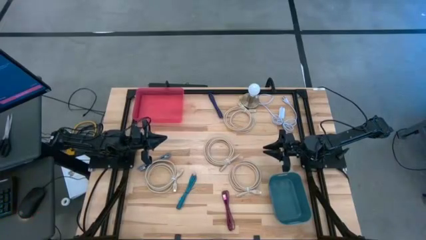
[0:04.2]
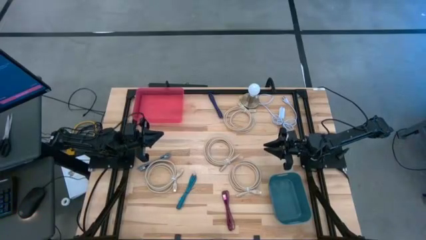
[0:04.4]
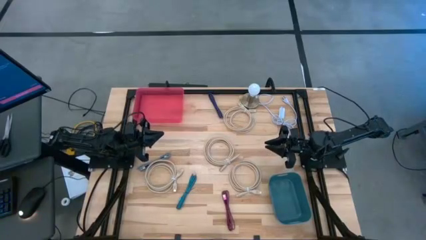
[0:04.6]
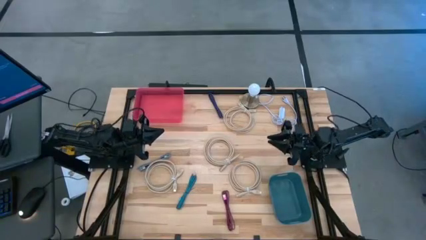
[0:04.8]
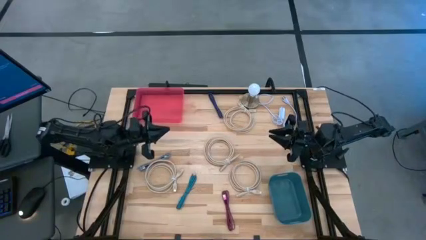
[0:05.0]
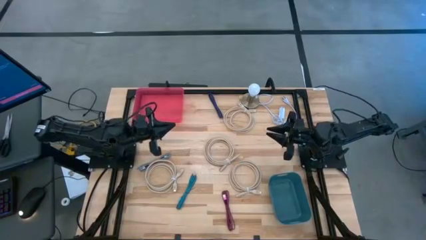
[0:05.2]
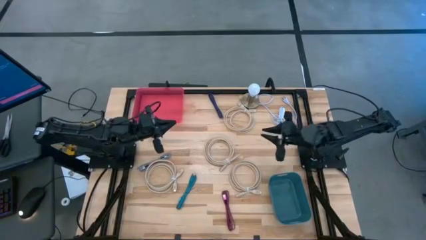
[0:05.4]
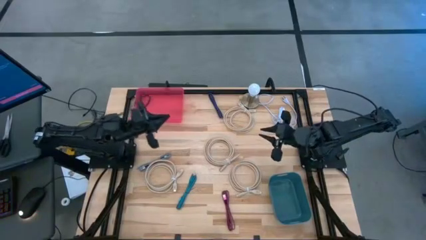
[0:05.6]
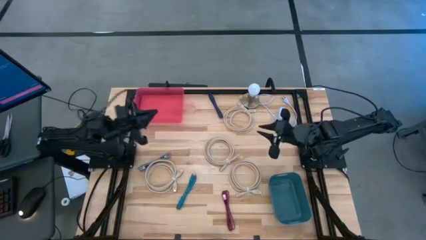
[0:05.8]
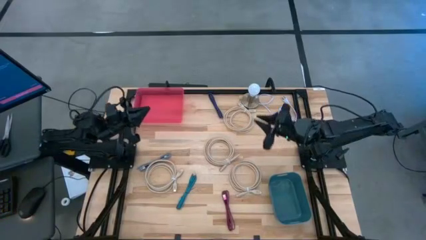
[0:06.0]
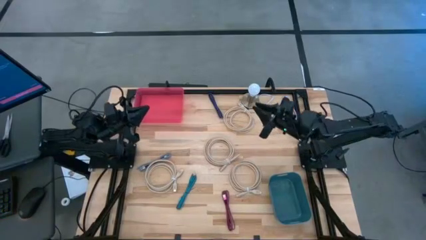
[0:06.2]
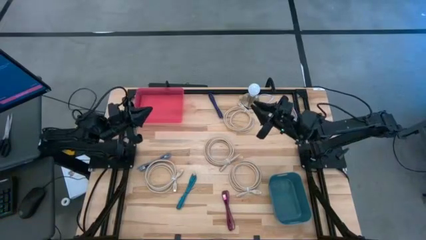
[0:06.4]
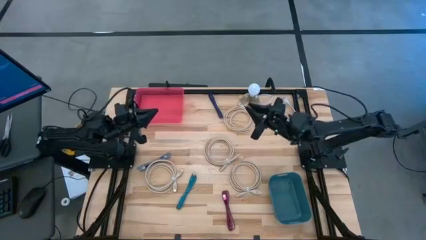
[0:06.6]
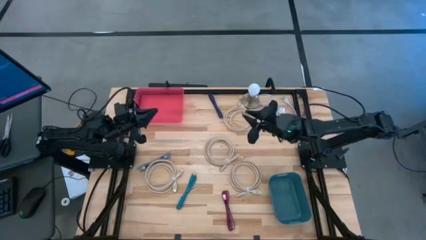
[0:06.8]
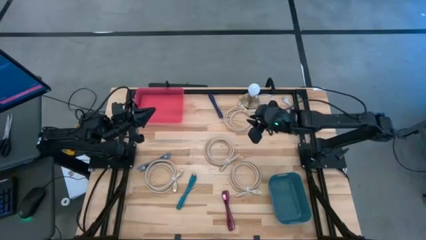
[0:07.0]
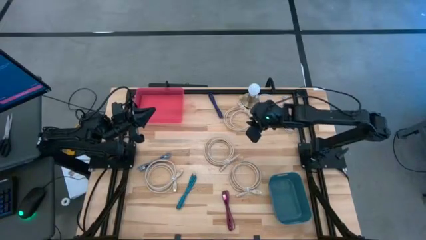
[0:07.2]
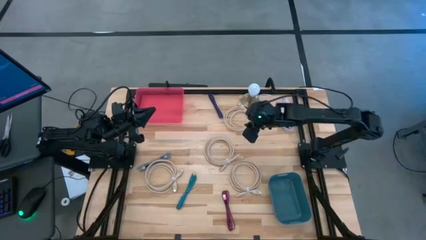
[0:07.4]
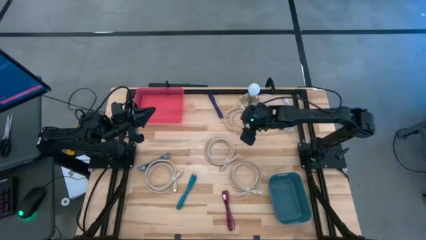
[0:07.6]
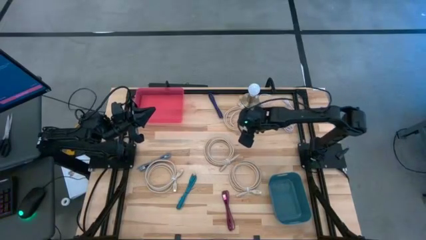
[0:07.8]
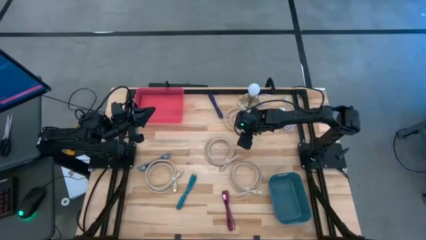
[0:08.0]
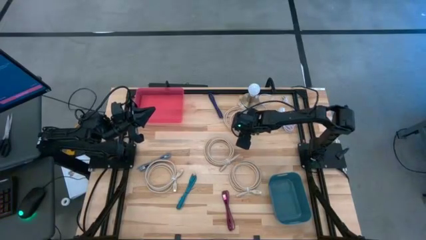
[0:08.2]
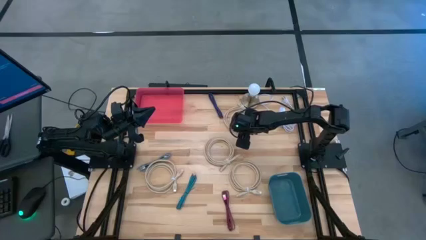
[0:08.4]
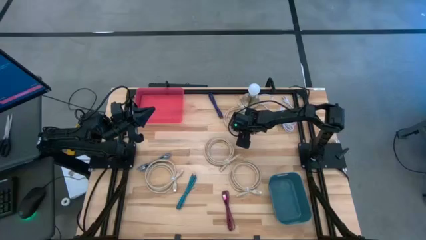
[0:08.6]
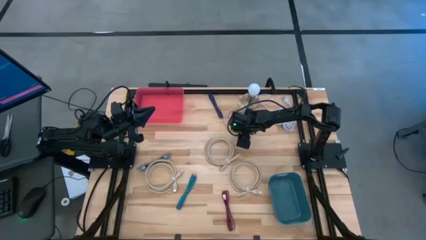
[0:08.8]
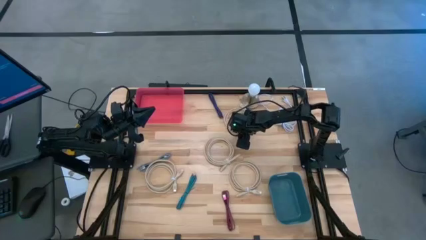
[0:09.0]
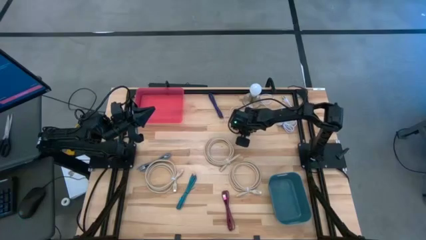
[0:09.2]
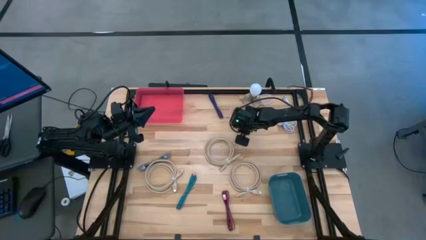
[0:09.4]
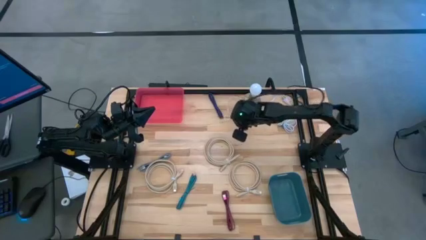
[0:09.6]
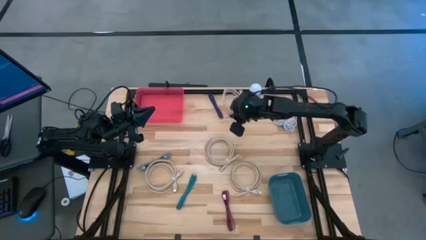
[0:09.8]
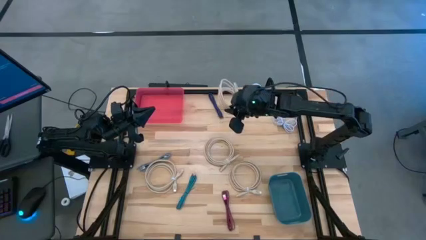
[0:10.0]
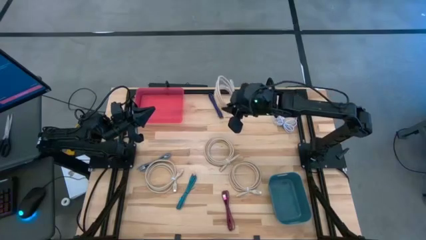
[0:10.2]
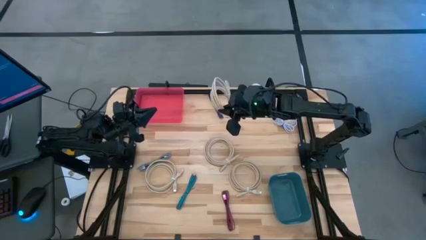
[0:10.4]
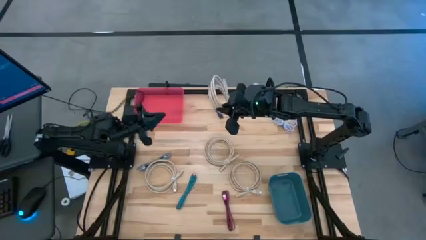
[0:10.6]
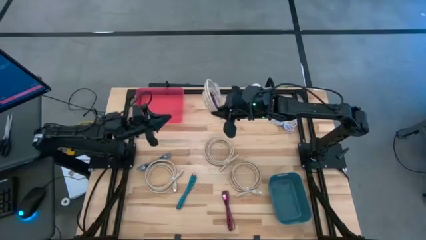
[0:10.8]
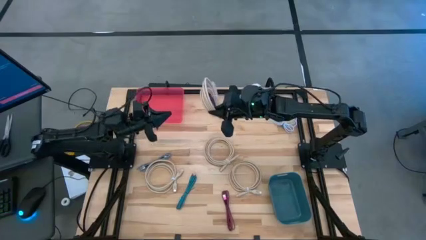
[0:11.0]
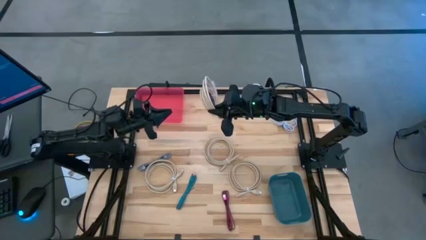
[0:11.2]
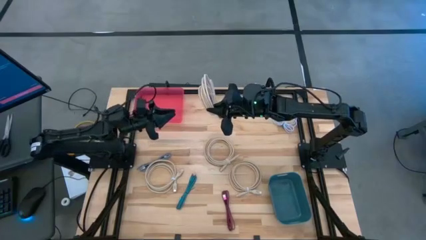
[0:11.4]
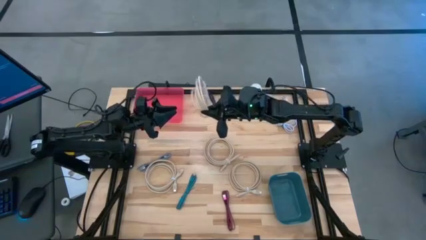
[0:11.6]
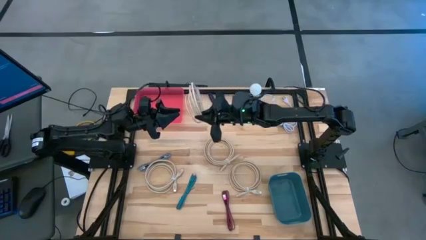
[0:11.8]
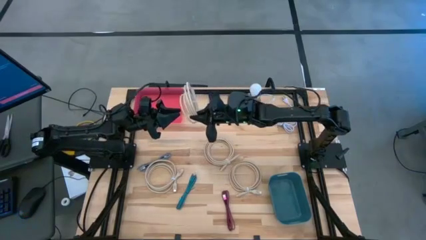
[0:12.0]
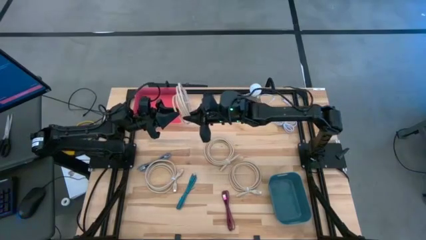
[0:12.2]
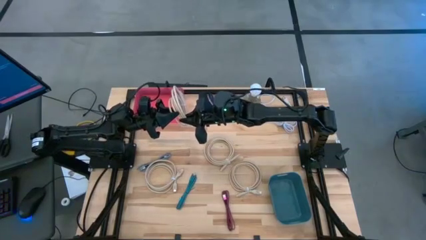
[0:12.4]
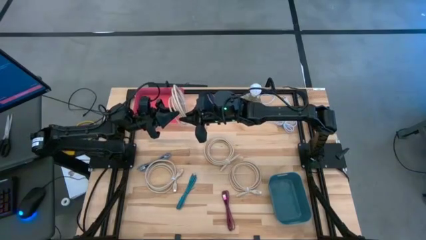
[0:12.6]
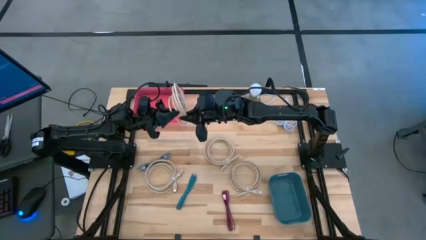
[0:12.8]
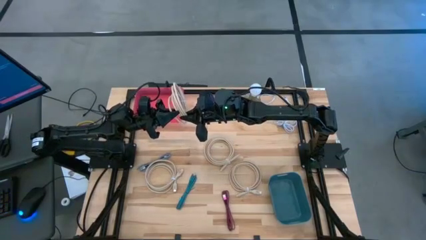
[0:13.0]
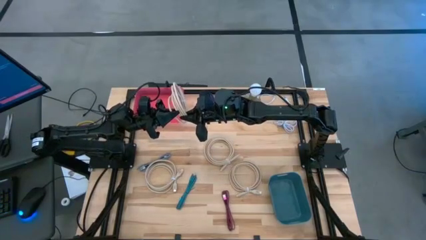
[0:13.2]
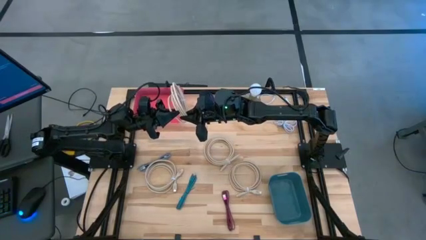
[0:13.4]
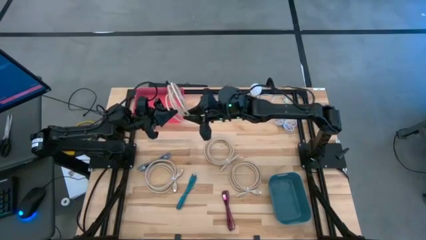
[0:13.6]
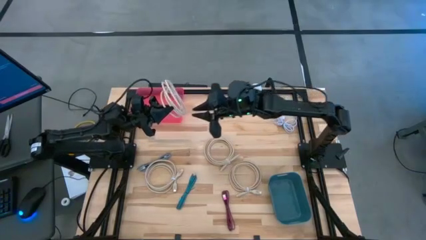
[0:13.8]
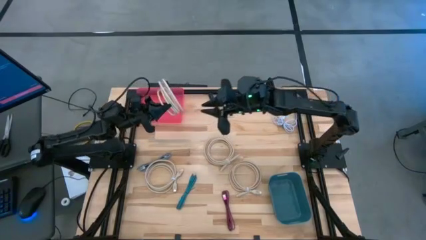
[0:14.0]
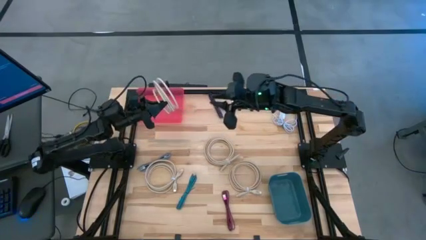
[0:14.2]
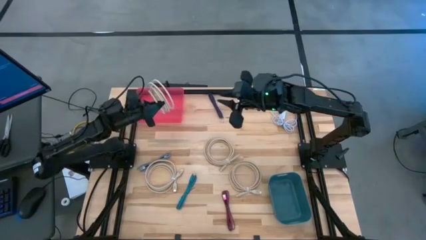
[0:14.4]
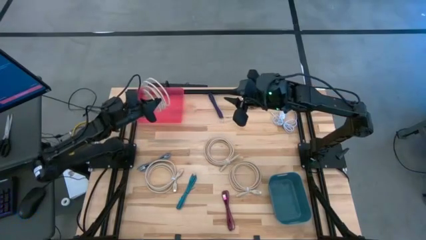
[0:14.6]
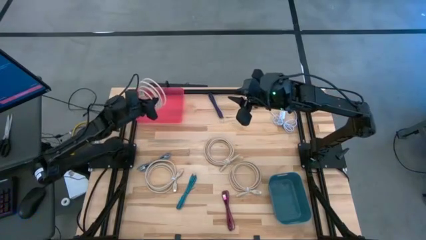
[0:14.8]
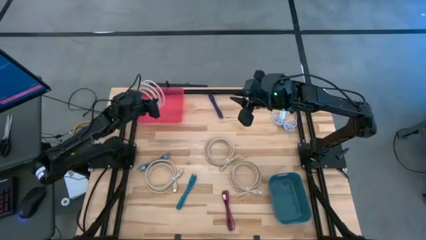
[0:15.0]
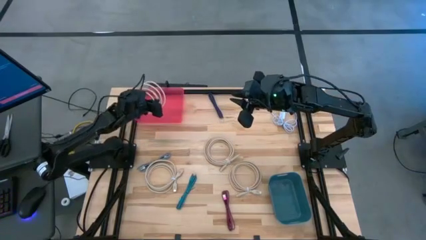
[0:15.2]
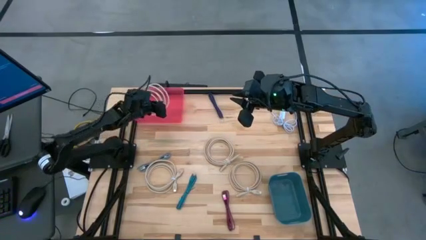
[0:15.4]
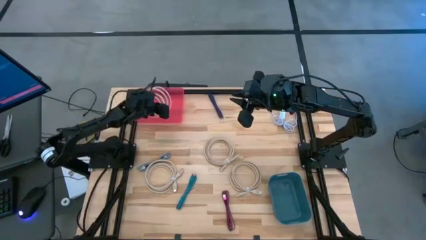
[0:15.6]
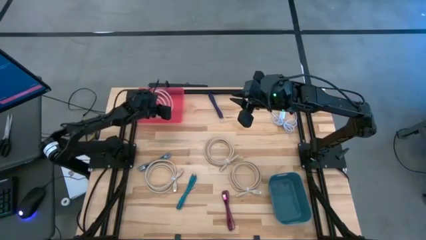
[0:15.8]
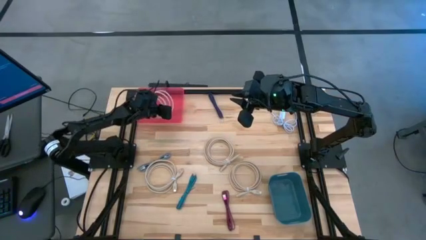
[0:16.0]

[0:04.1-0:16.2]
Task: Pick & Place USB Port
Put the brown USB cable into the red bin

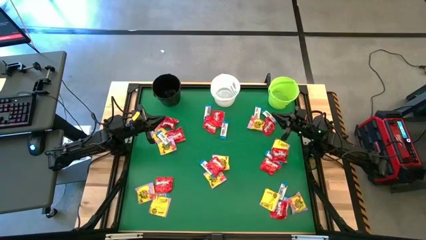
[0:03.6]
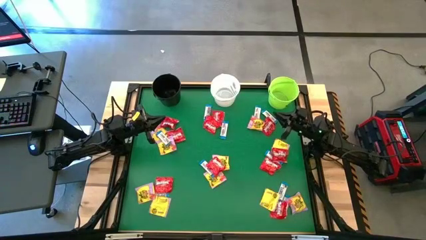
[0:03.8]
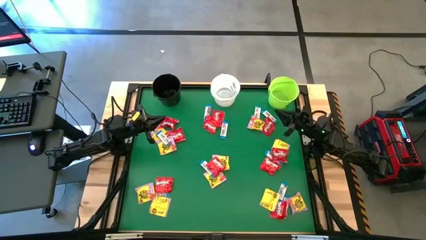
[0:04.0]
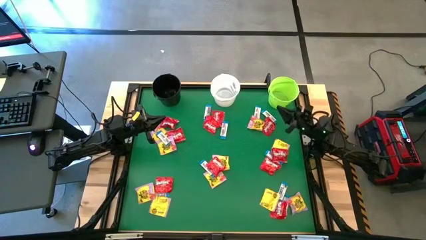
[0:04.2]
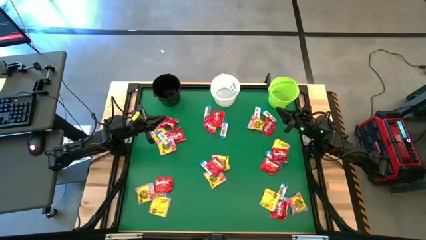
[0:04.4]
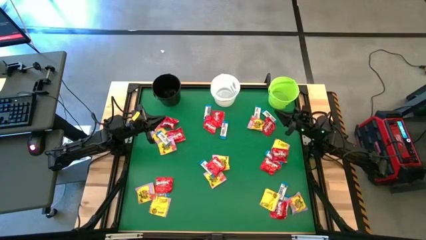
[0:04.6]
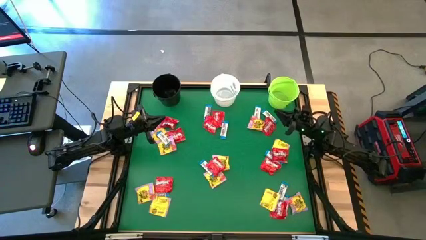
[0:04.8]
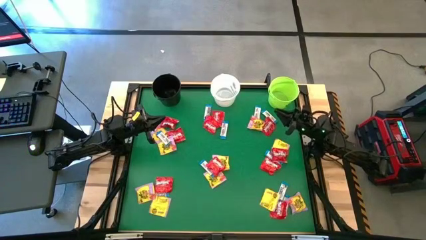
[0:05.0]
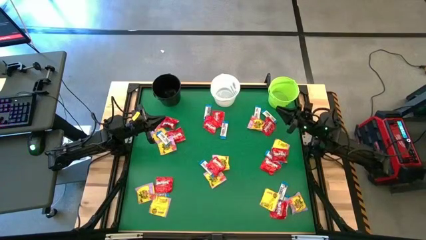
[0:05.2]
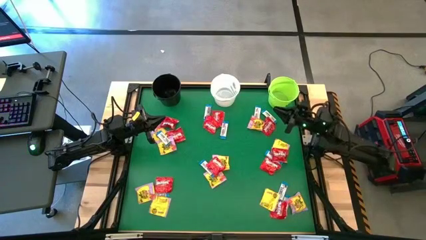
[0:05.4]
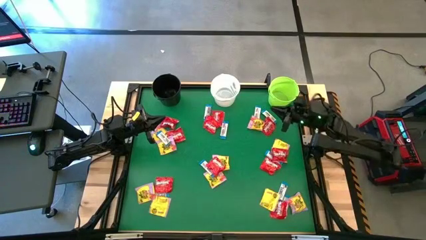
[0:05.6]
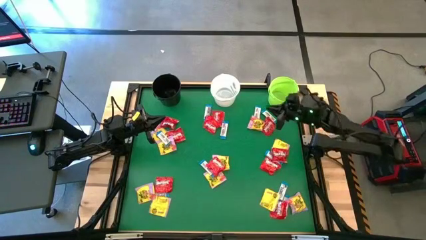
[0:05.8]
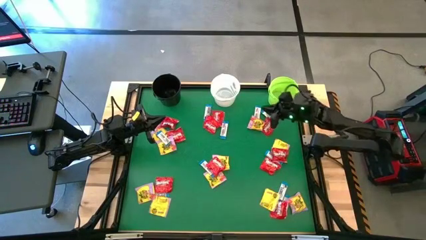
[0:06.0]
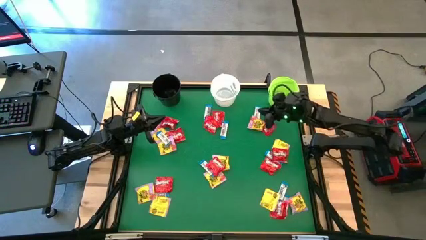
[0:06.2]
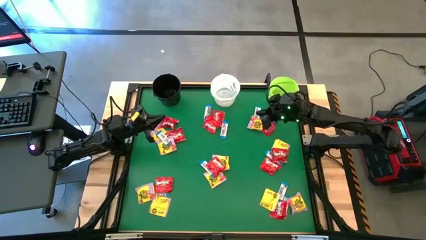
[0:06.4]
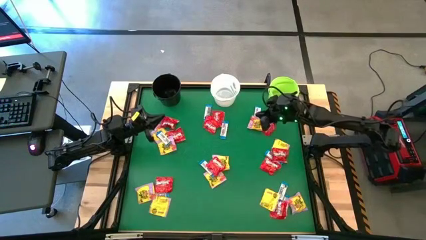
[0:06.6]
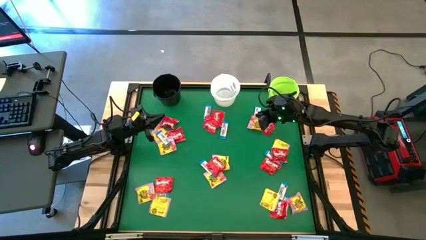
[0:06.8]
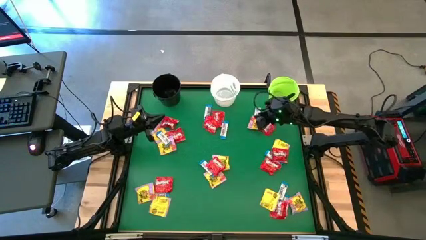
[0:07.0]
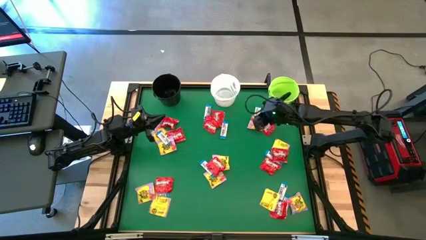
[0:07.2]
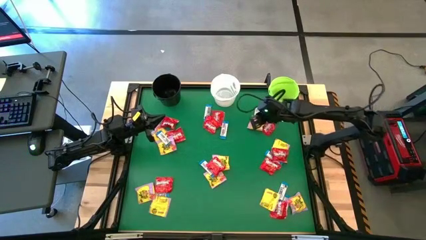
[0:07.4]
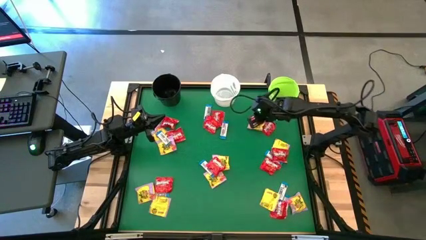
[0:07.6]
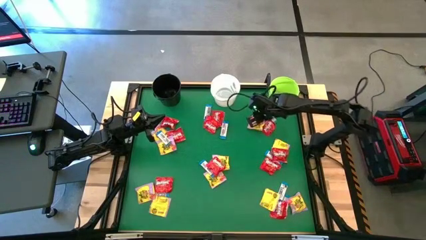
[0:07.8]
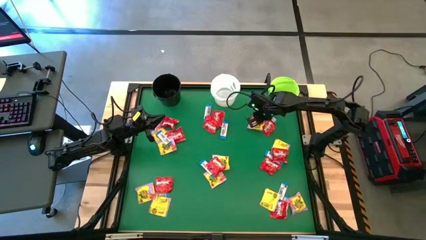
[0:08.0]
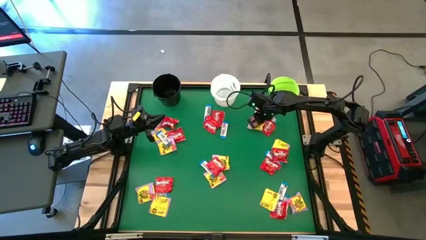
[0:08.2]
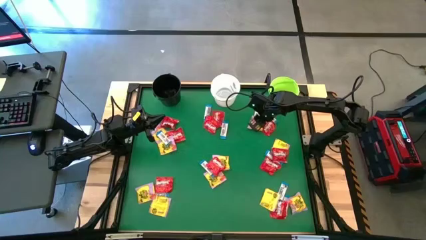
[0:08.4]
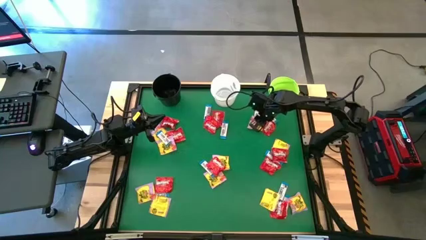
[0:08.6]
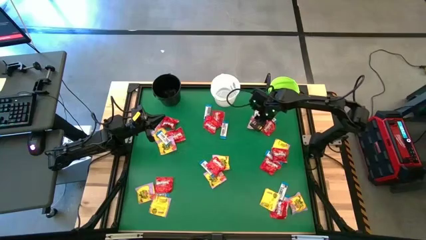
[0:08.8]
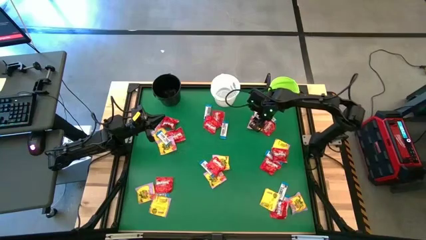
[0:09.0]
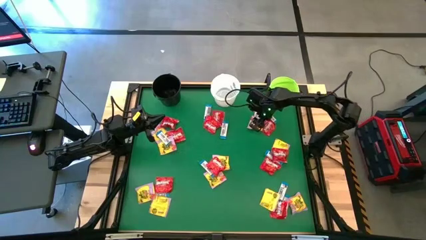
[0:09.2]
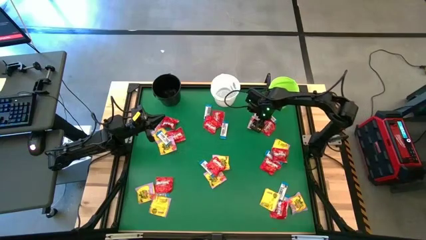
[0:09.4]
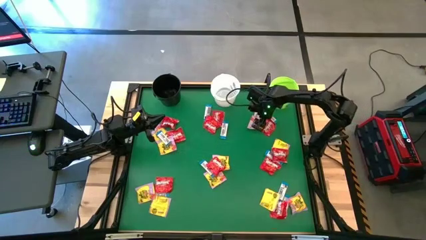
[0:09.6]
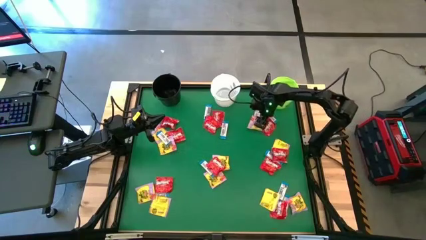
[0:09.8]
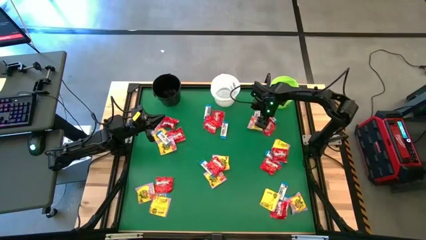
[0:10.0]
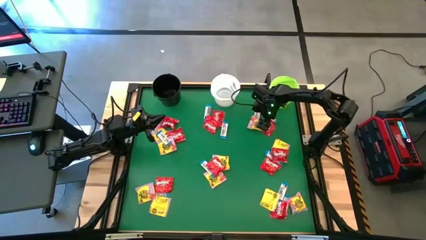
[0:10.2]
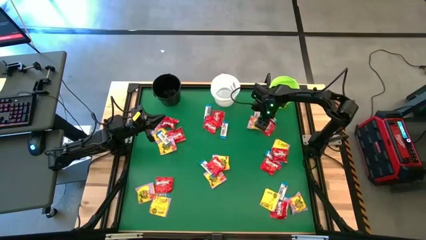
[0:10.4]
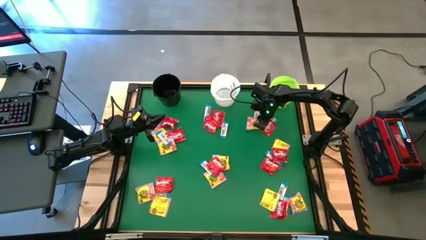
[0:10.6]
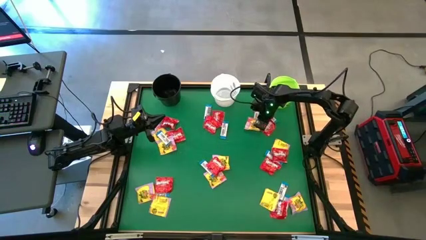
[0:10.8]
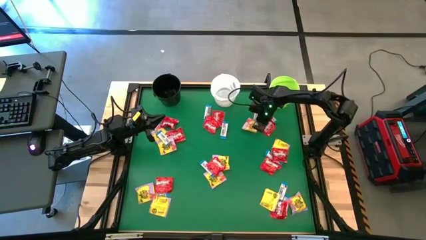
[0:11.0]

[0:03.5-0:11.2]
Task: Sort candy by brand, put in halloween buckets
Put the yellow candy into the white bucket
